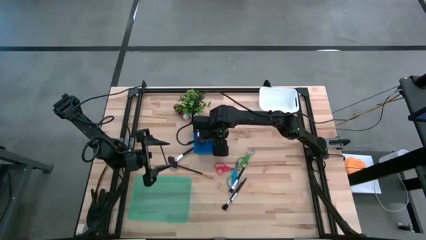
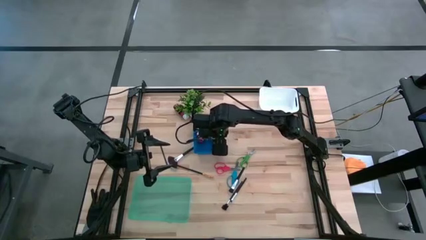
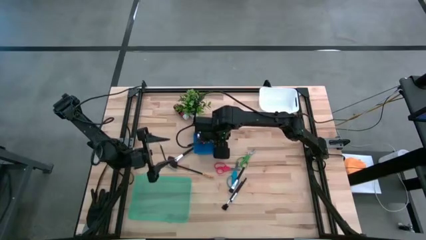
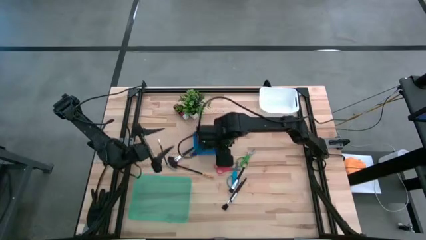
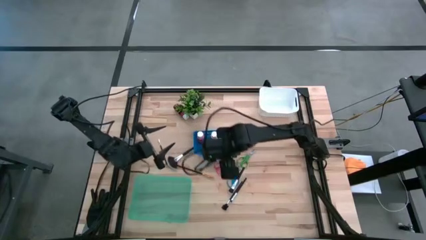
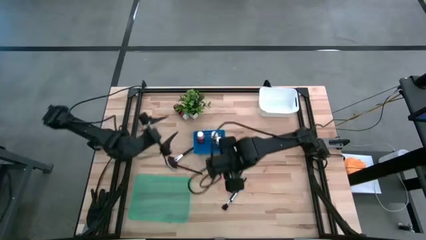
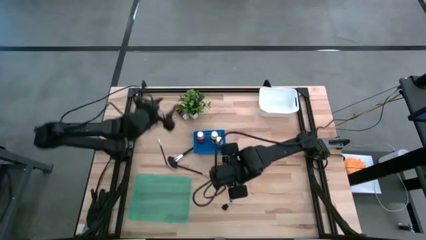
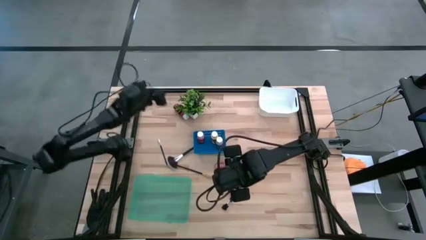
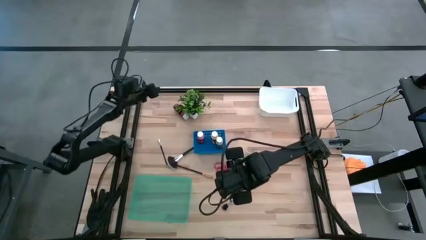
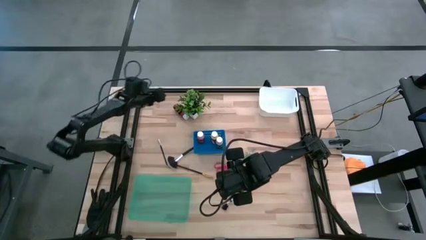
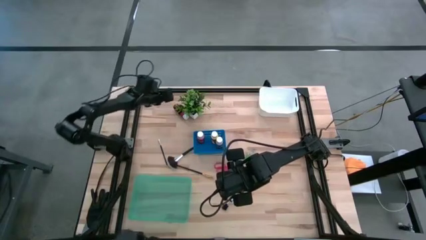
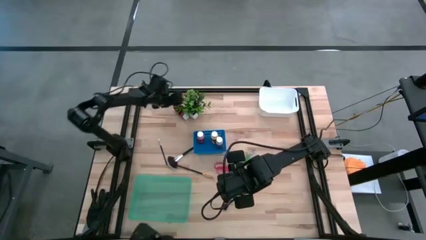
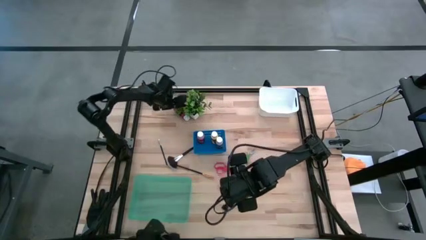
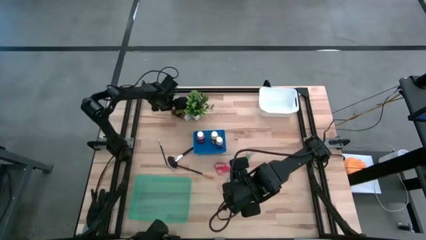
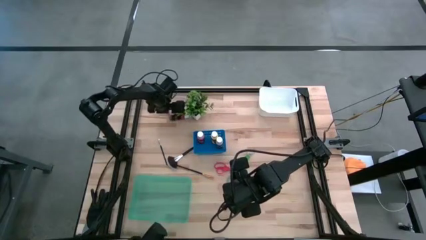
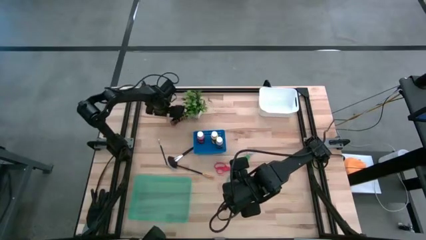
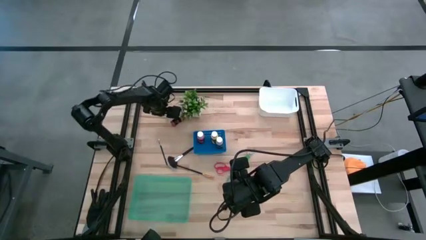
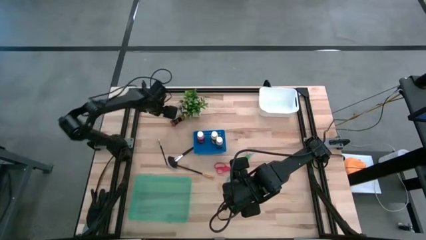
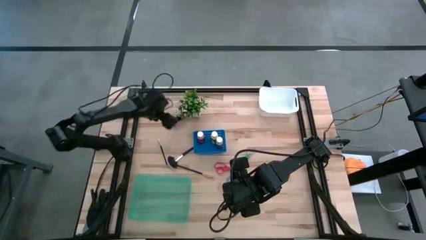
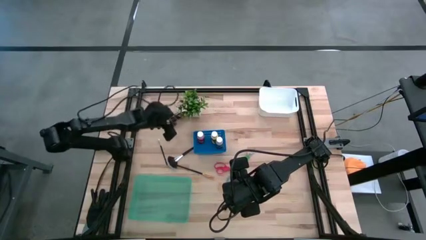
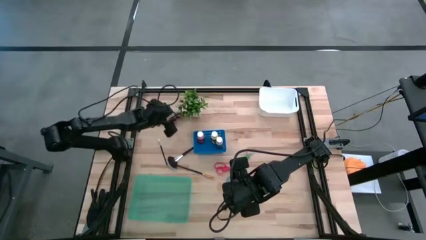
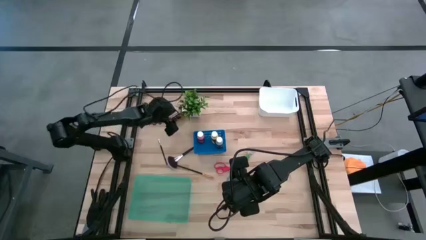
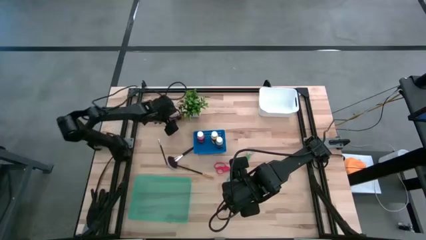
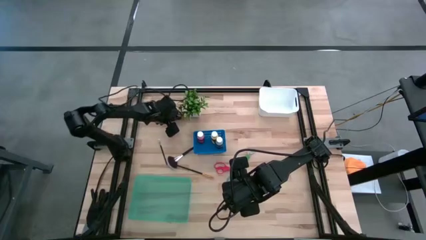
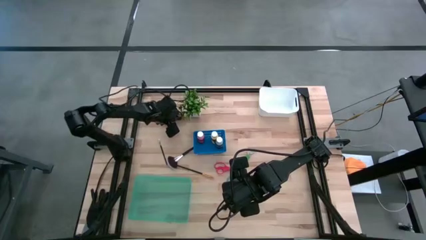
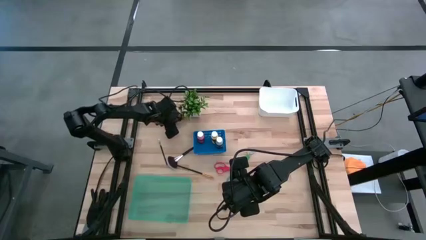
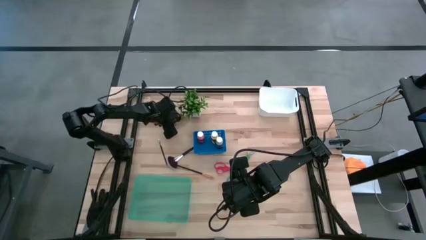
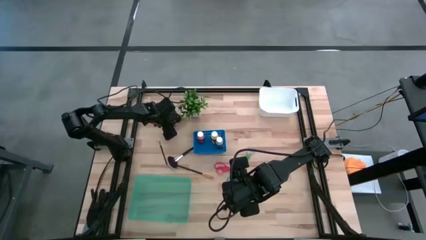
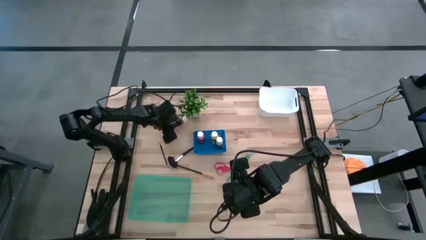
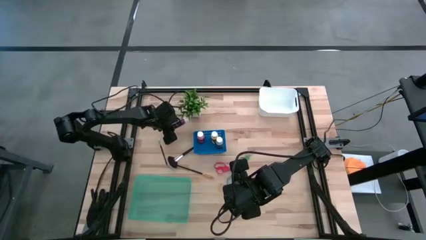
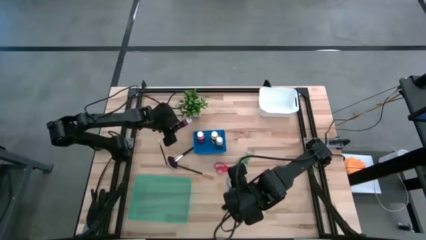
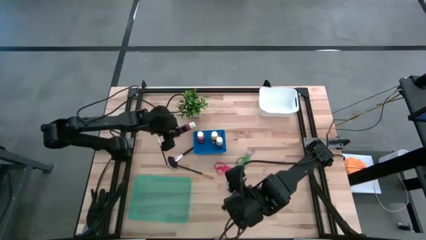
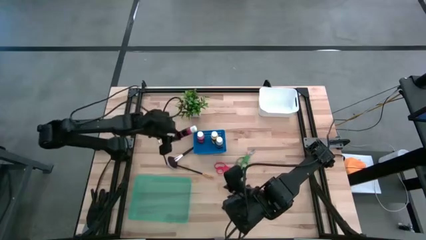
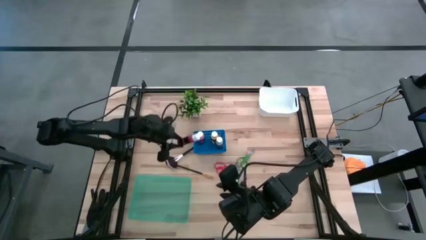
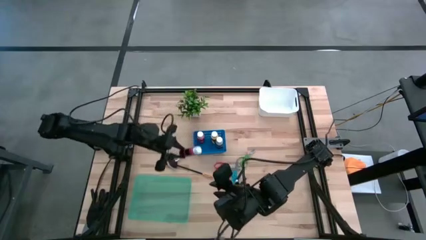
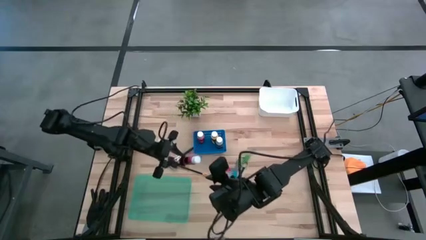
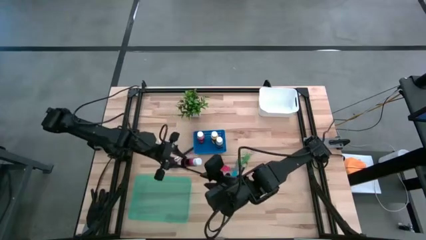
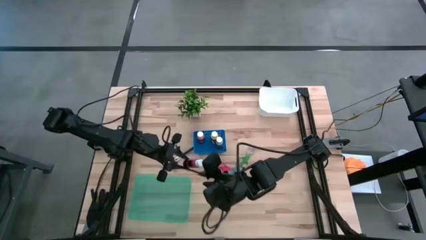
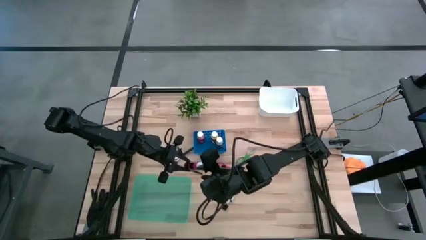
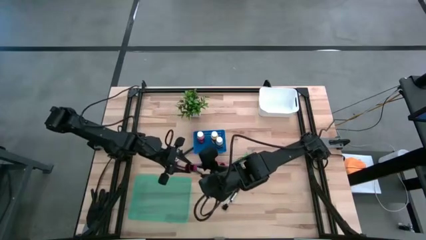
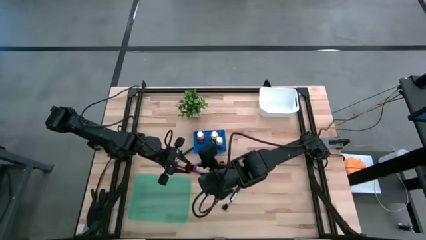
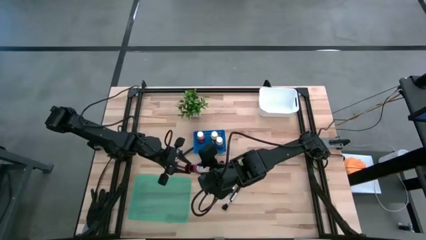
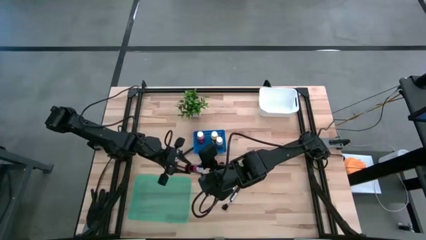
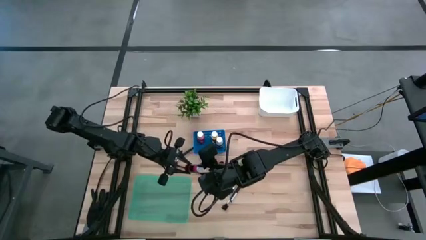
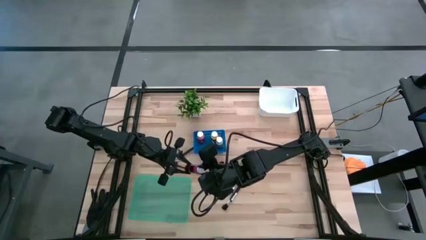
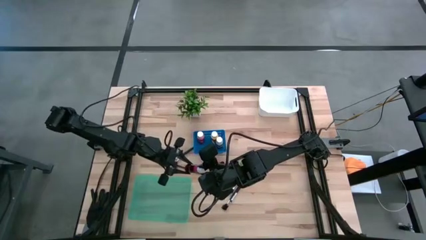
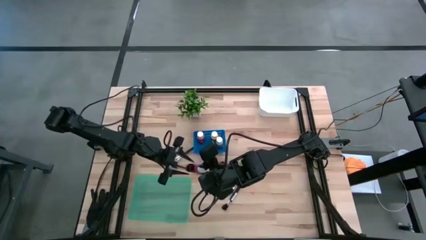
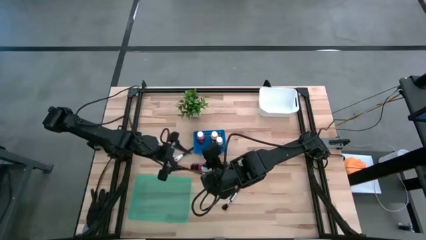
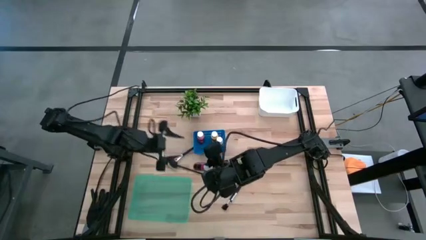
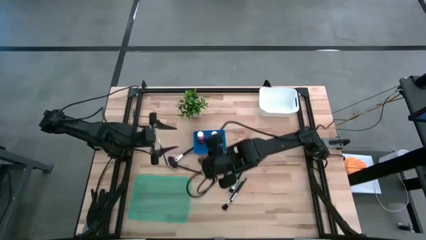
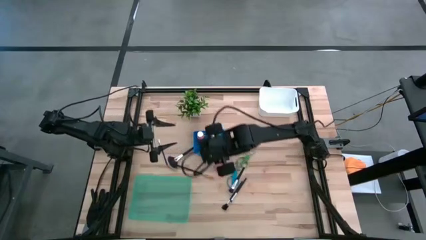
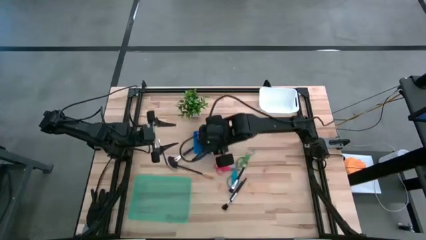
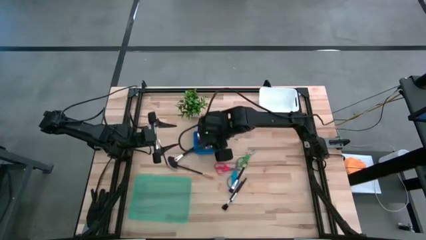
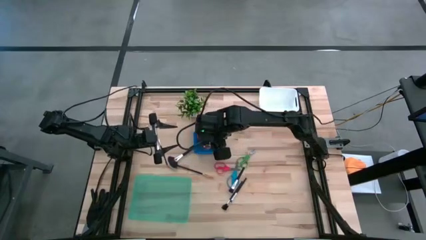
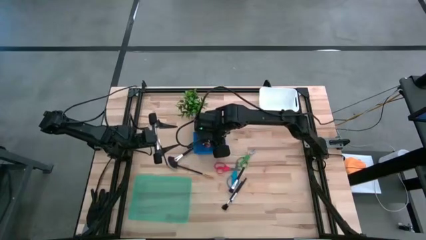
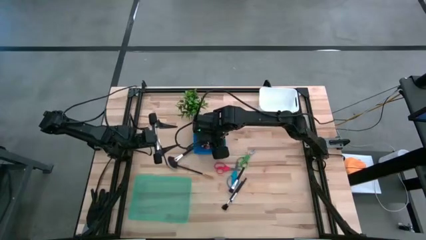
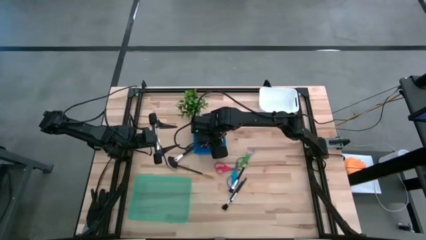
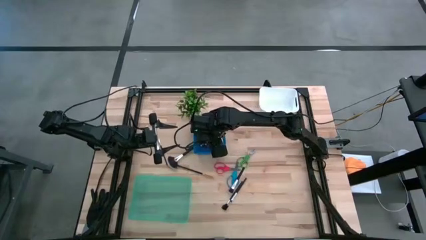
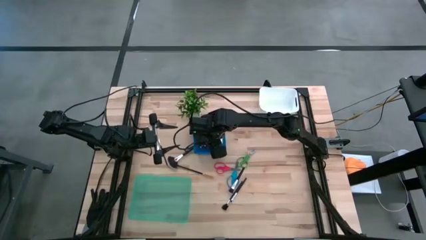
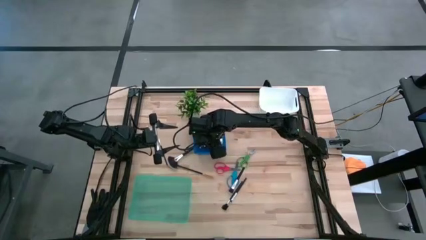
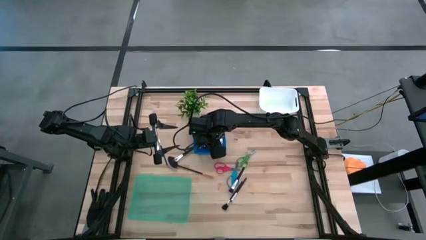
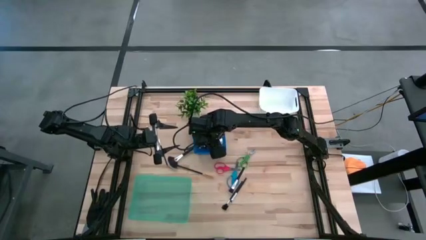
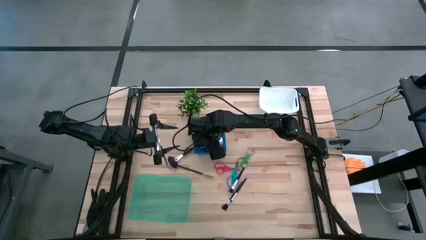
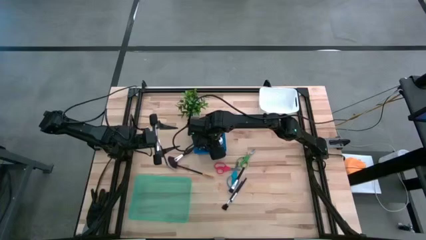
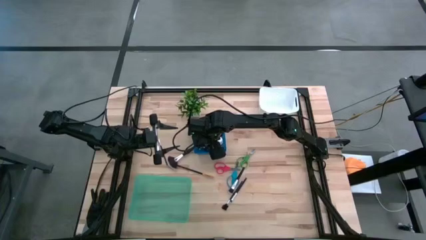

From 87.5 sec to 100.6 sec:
Task: Pick & Place Paint Supplies
Put the red paint into the blue bin
